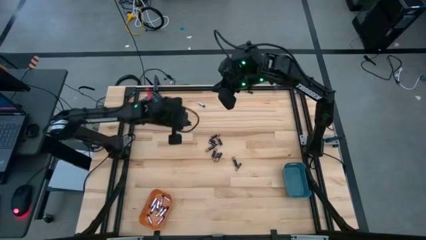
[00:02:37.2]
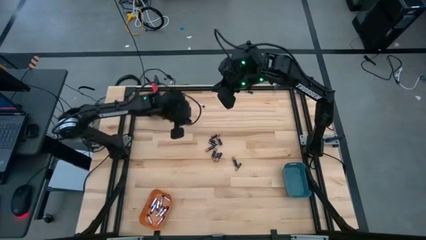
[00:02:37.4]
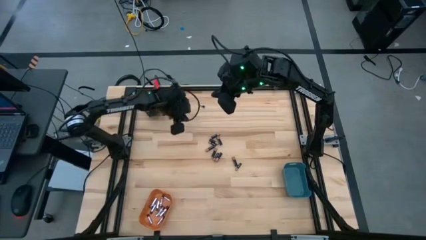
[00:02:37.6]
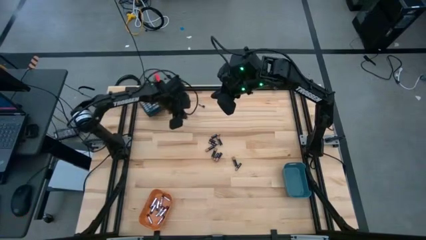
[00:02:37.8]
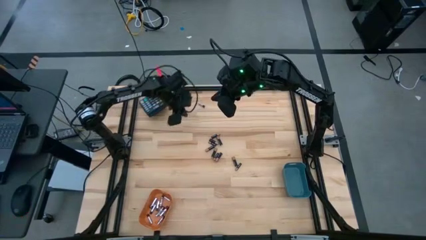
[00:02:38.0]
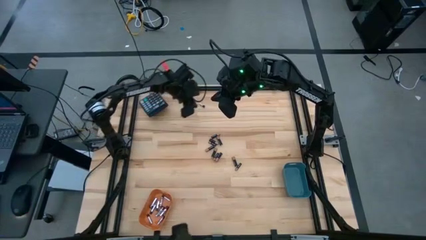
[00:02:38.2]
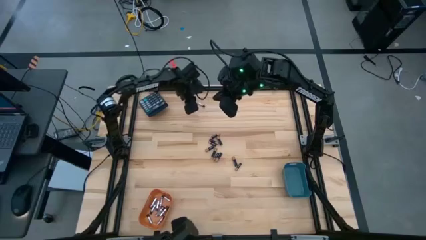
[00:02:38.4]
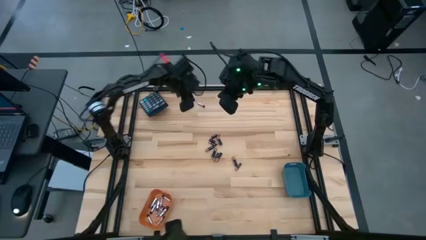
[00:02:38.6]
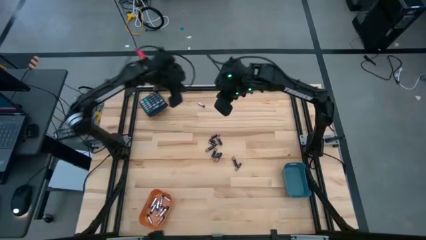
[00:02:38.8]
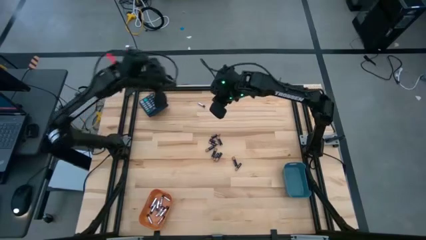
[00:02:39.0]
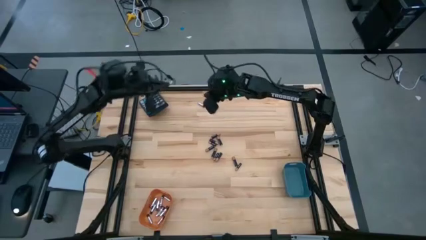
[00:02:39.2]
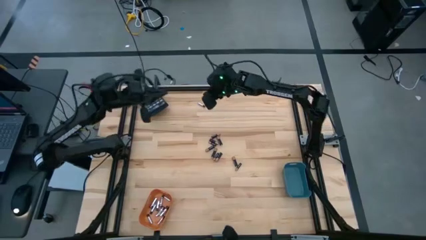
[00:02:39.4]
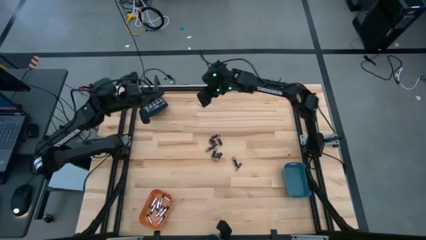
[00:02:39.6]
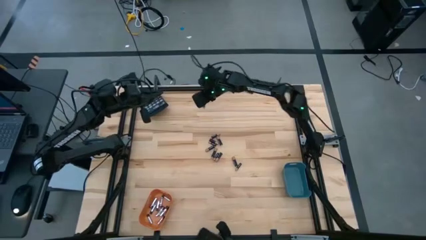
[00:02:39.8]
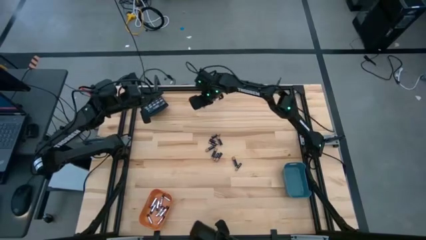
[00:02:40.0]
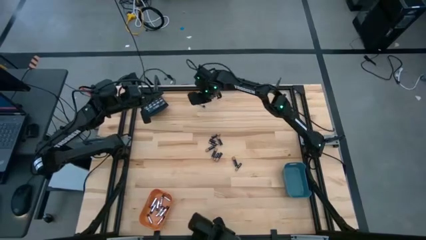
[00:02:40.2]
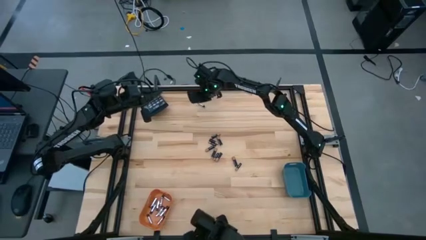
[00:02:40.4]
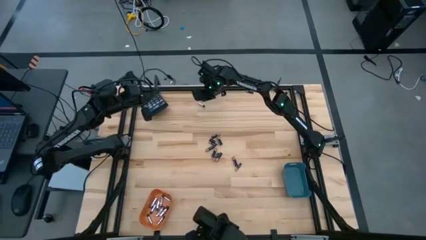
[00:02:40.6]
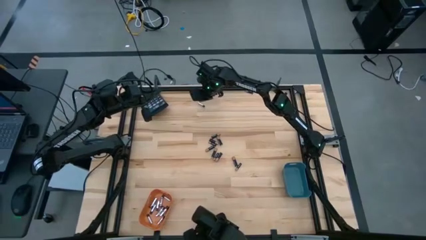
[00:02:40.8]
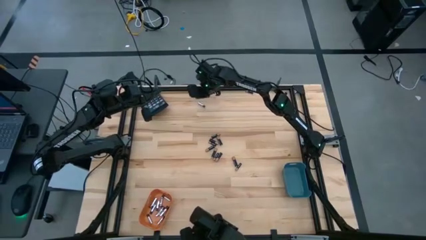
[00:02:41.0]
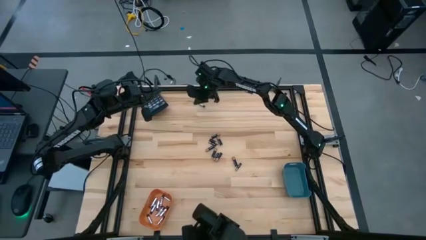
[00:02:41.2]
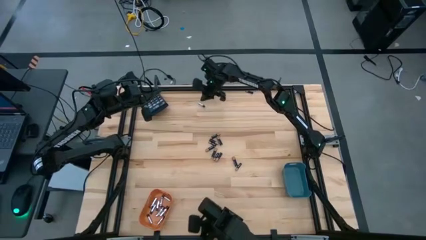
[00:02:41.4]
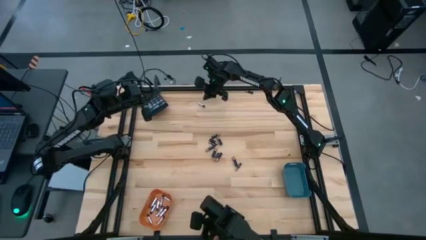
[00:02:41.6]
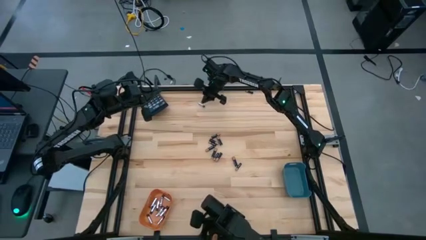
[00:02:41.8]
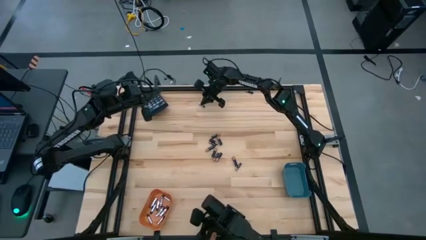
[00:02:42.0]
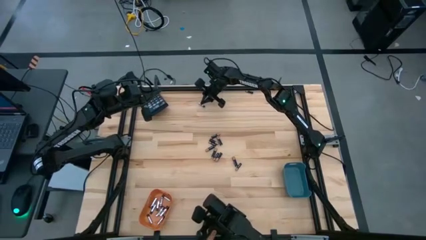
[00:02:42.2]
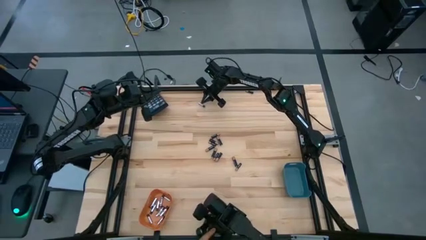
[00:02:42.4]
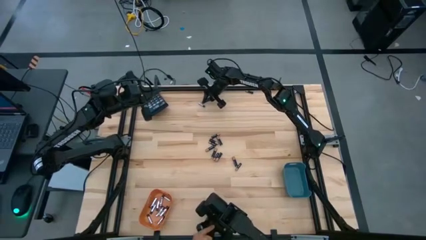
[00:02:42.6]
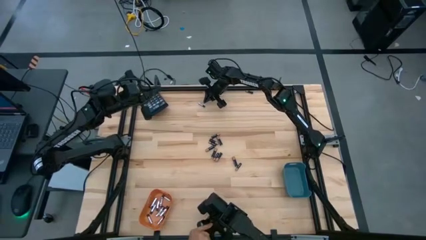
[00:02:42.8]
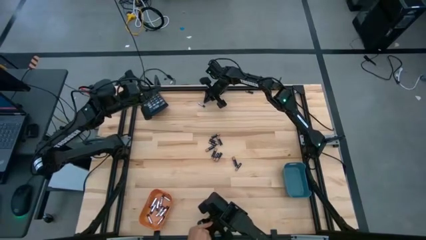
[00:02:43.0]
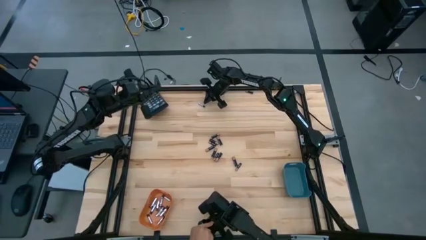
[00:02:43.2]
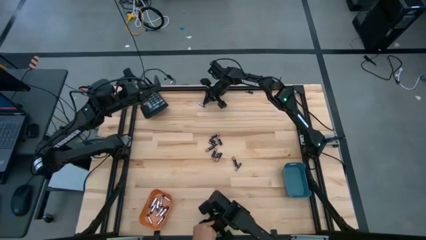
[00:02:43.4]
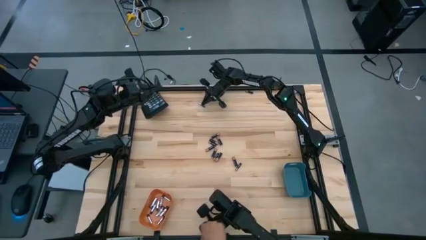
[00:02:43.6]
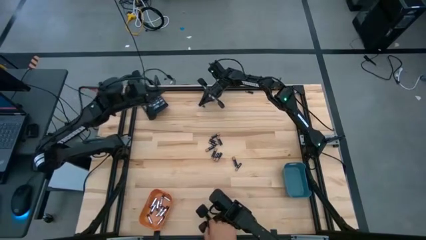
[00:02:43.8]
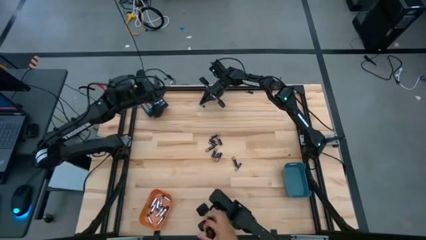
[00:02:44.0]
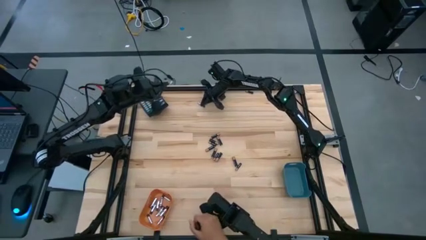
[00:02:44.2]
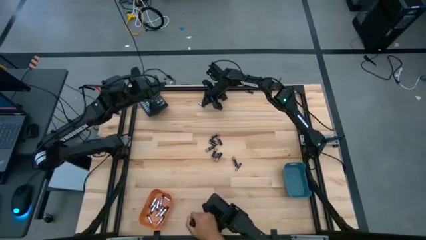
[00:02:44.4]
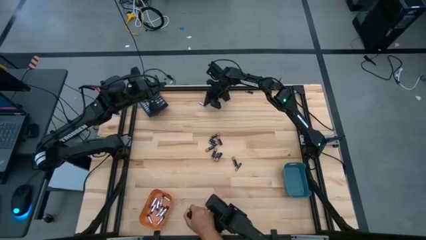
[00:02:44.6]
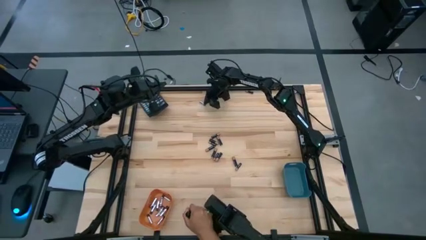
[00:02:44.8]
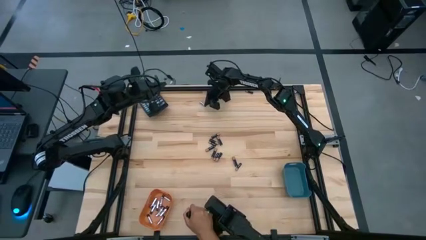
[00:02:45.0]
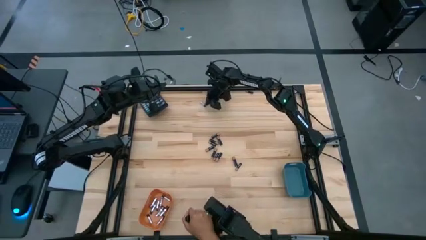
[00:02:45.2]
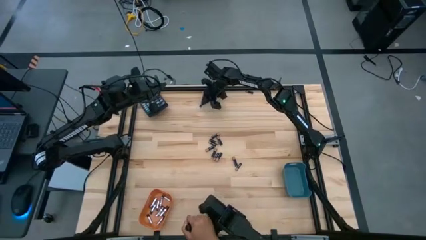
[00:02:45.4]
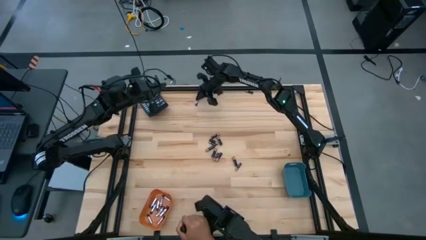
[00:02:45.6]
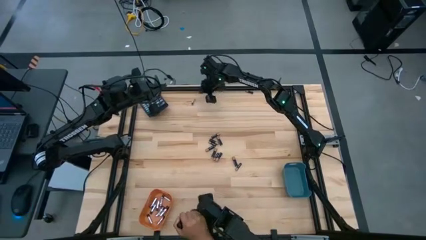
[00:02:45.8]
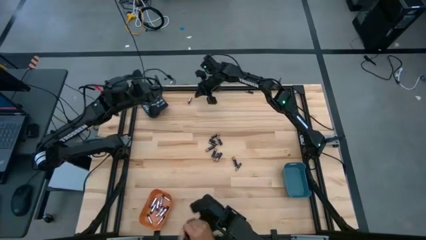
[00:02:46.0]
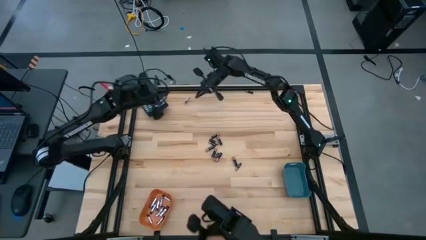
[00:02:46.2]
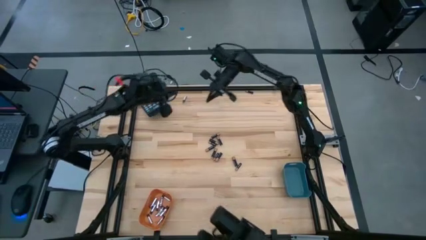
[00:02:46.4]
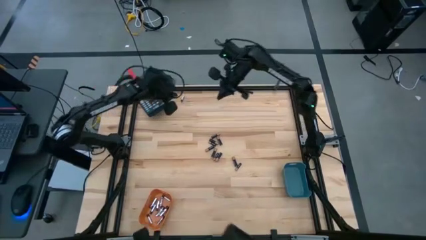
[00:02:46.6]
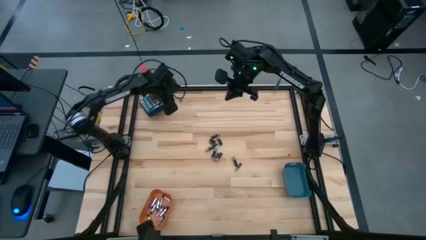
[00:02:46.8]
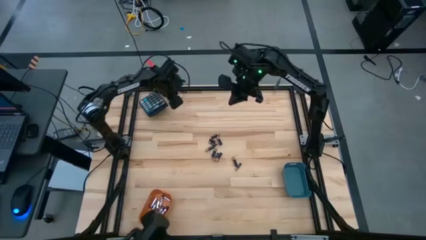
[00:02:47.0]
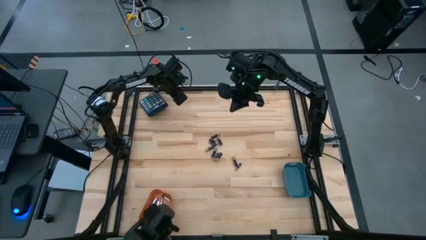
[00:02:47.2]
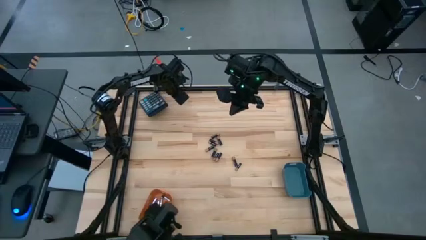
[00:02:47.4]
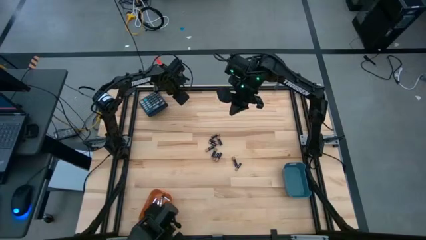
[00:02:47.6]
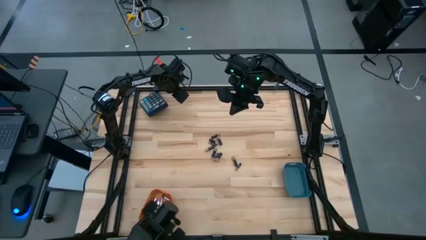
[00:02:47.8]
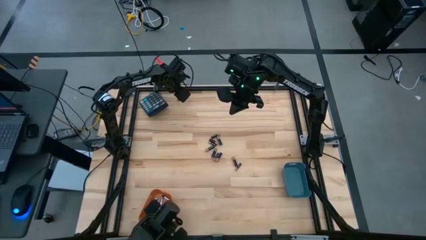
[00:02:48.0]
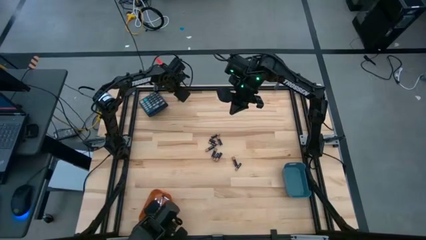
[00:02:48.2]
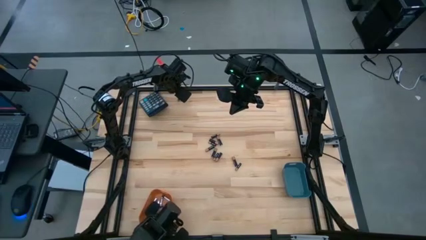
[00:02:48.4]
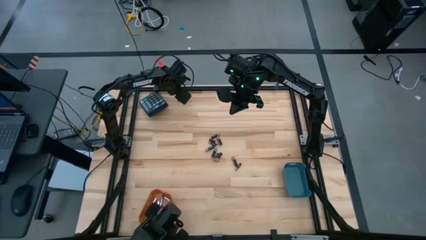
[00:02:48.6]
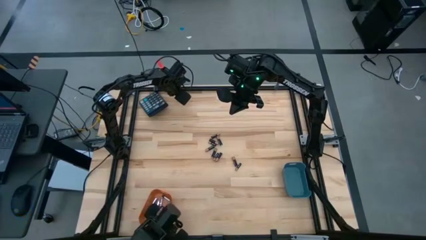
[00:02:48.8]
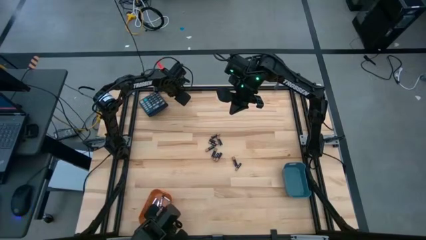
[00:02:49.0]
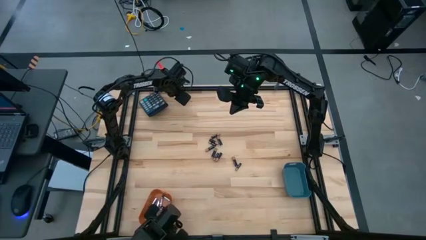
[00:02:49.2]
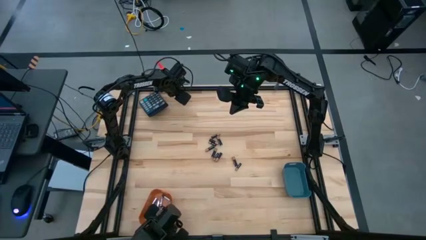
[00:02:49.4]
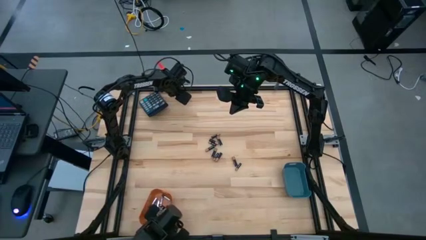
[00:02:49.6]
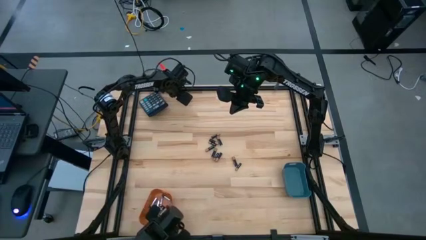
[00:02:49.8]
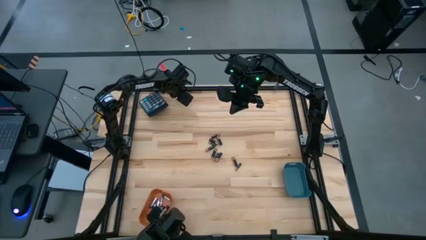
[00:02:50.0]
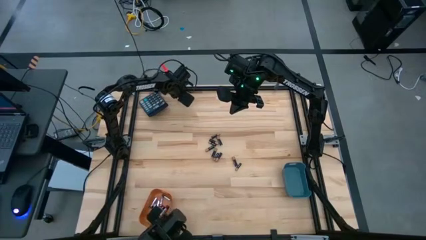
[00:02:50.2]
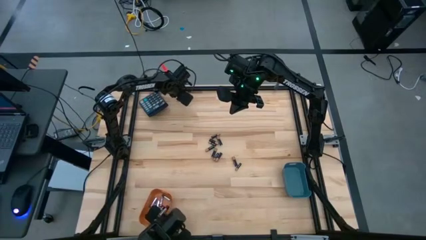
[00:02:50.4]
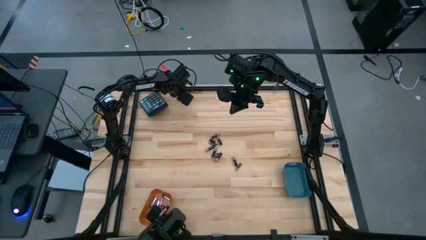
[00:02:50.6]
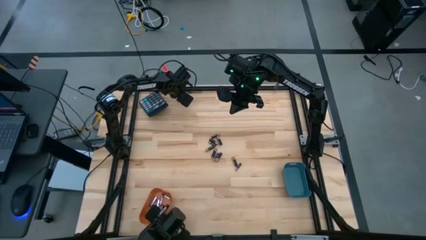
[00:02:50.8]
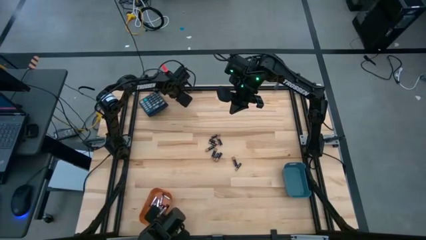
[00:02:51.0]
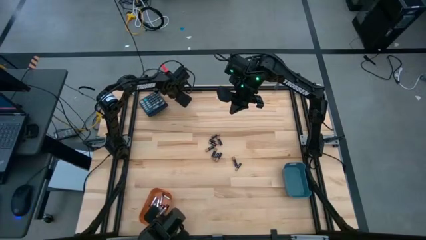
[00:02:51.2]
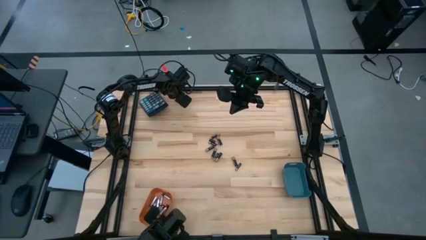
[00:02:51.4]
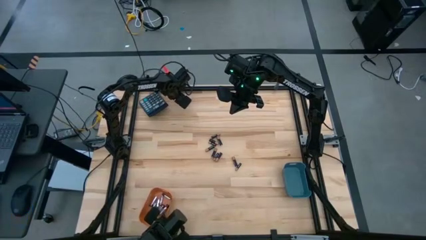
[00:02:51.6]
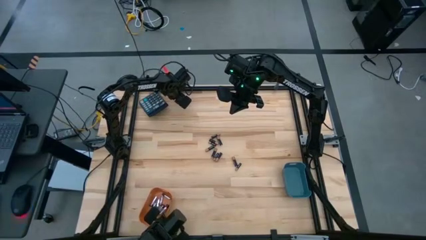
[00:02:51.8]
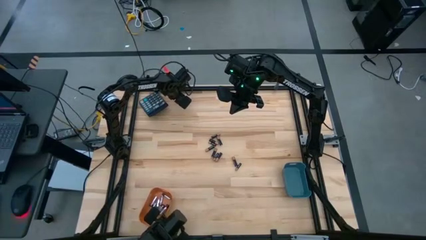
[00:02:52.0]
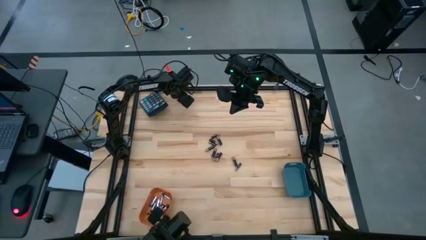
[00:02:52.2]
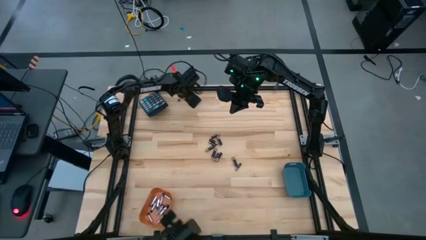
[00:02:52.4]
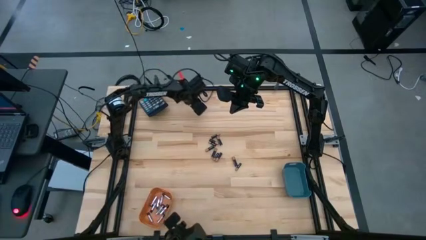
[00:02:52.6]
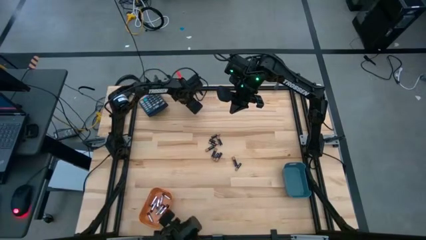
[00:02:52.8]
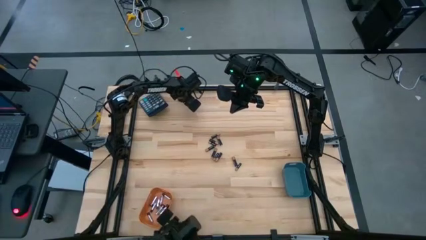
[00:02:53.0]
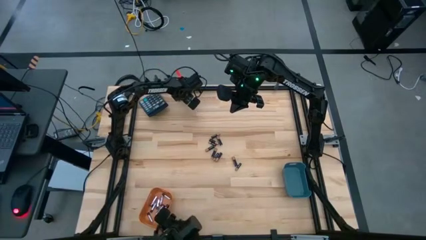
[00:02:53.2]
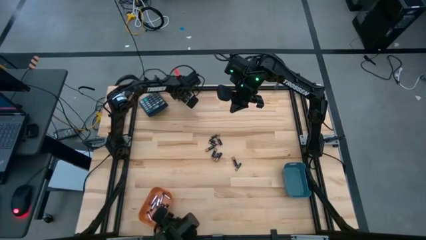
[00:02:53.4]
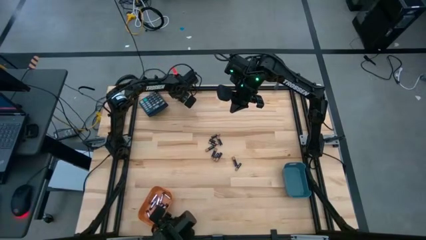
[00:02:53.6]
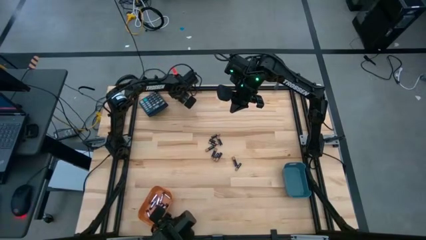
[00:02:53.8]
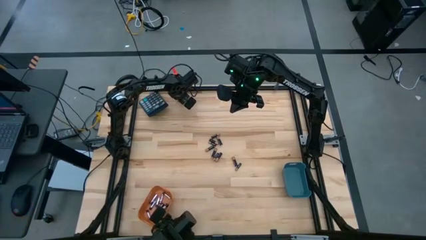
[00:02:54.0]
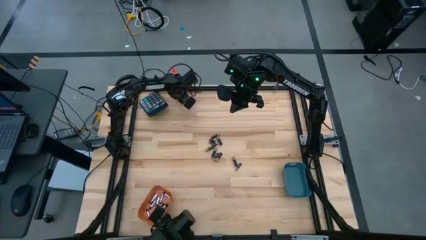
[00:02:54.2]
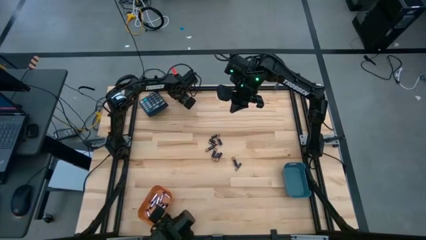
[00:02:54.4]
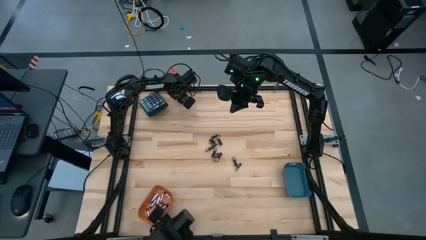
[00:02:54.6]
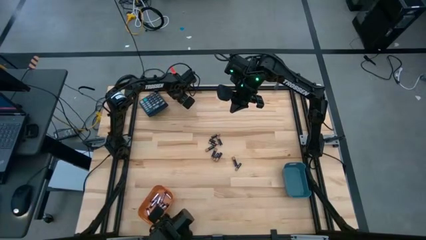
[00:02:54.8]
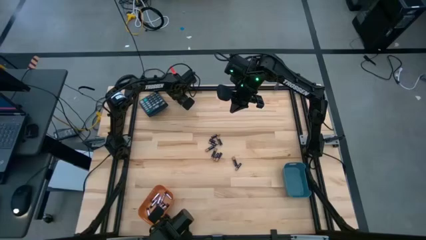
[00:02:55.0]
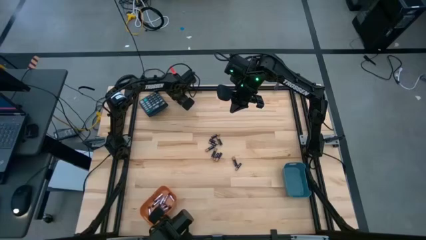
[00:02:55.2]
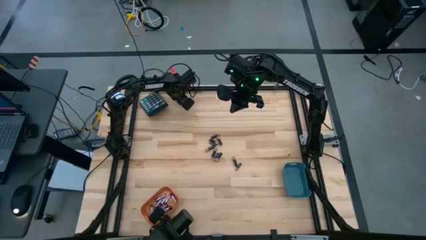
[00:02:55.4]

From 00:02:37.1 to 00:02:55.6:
Task: Sort batteries
Put the silver battery into the orange bin
